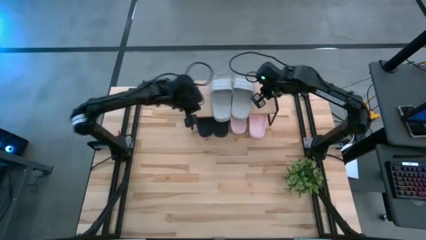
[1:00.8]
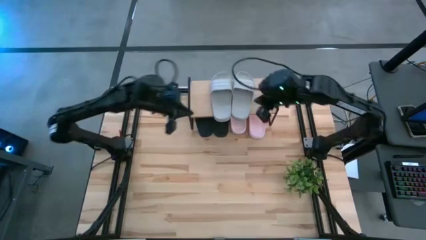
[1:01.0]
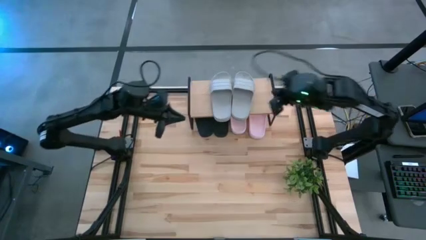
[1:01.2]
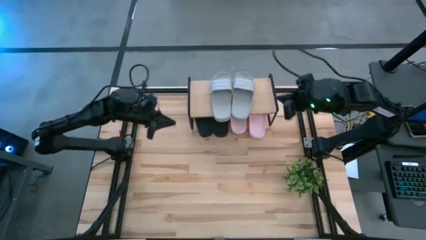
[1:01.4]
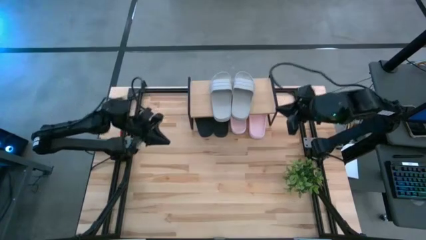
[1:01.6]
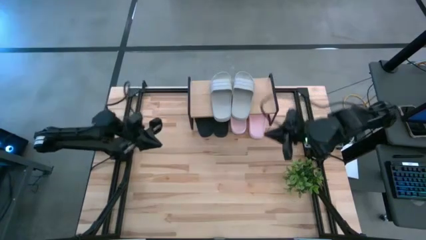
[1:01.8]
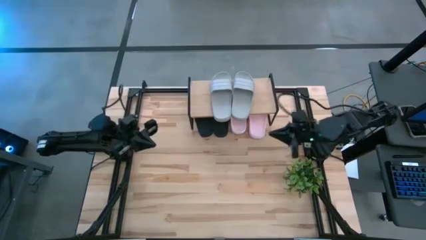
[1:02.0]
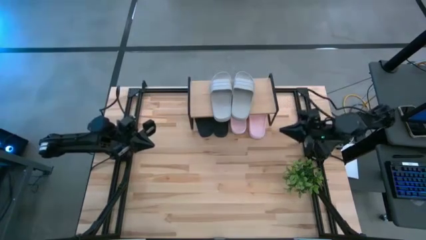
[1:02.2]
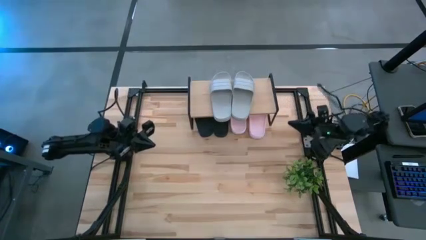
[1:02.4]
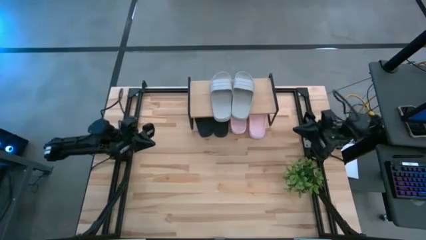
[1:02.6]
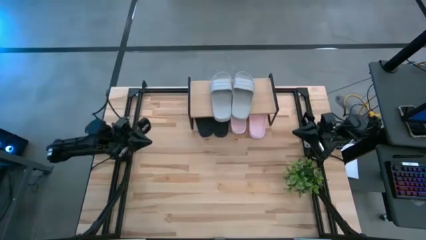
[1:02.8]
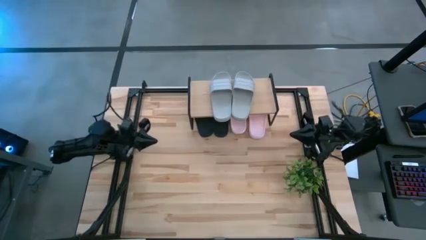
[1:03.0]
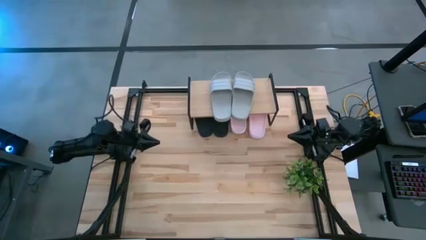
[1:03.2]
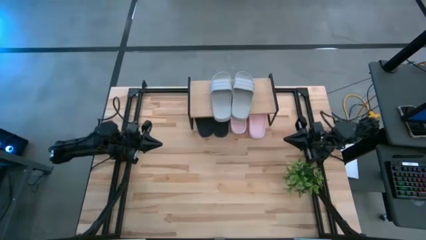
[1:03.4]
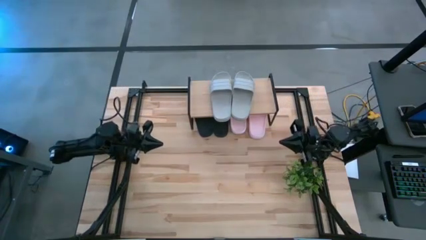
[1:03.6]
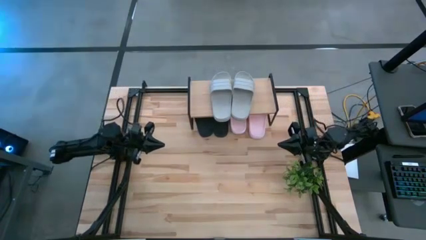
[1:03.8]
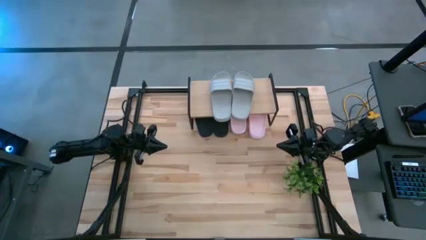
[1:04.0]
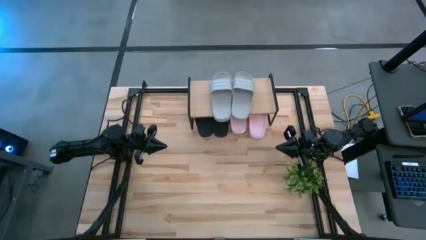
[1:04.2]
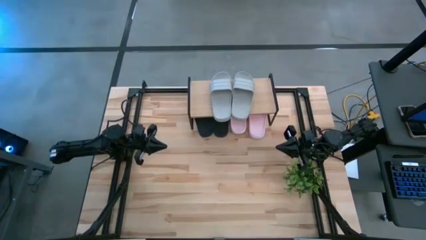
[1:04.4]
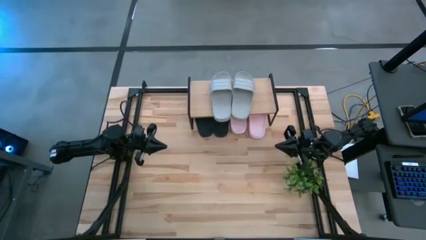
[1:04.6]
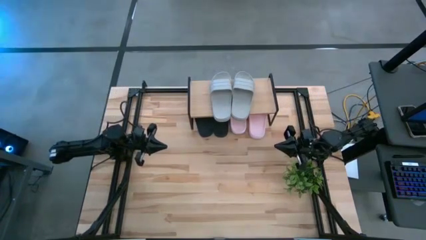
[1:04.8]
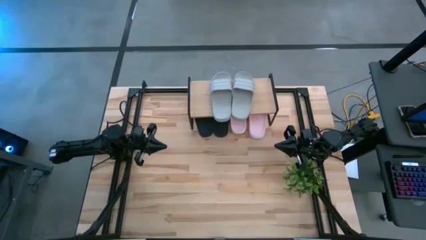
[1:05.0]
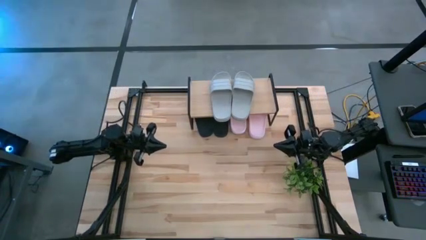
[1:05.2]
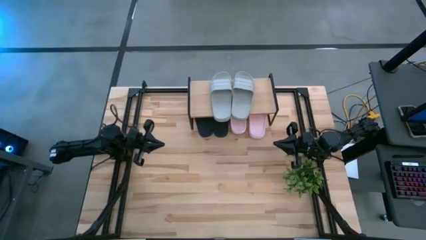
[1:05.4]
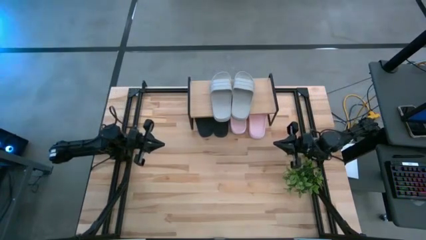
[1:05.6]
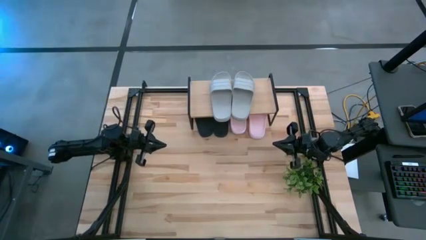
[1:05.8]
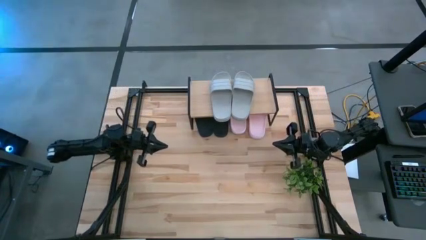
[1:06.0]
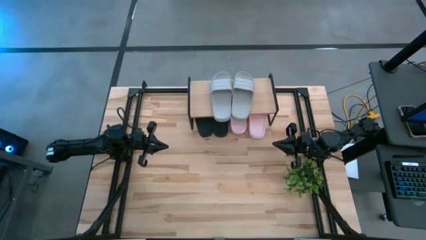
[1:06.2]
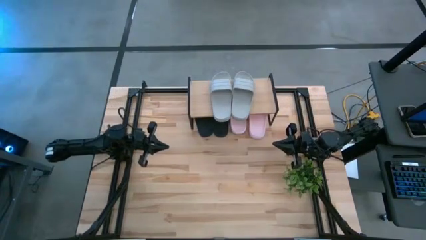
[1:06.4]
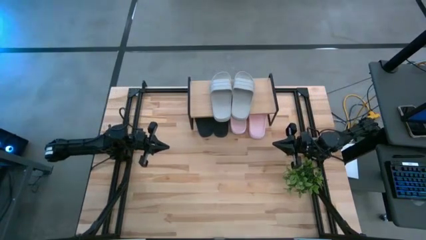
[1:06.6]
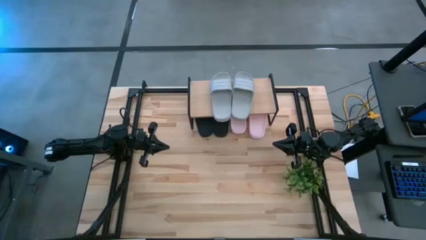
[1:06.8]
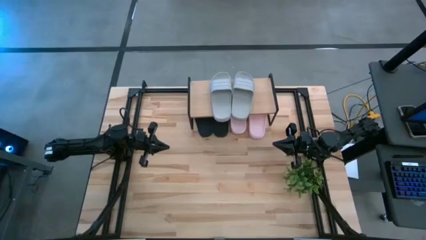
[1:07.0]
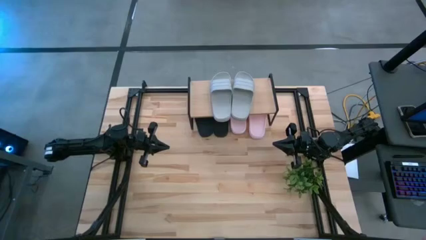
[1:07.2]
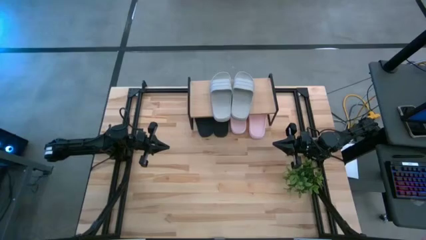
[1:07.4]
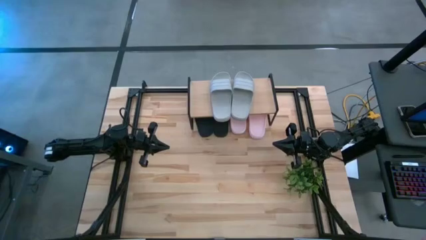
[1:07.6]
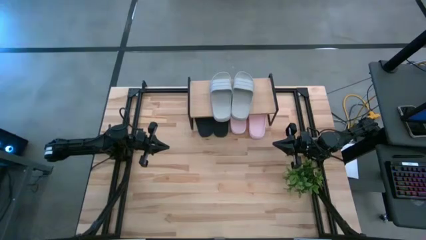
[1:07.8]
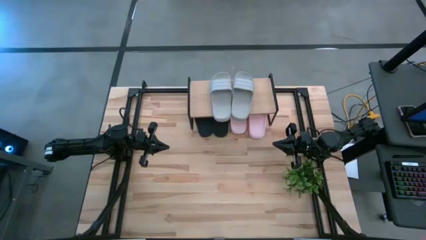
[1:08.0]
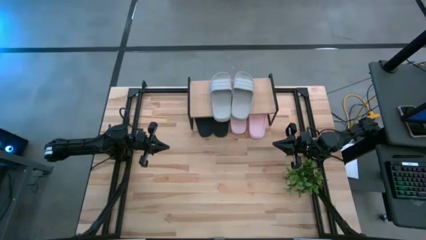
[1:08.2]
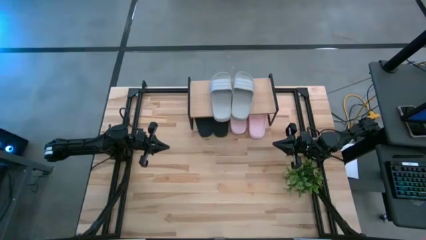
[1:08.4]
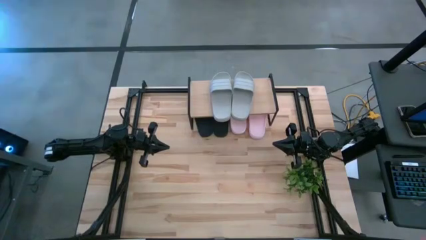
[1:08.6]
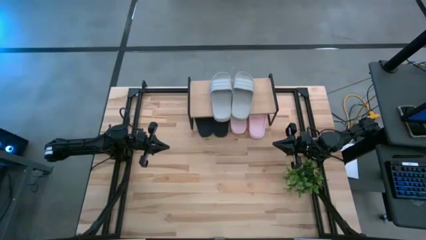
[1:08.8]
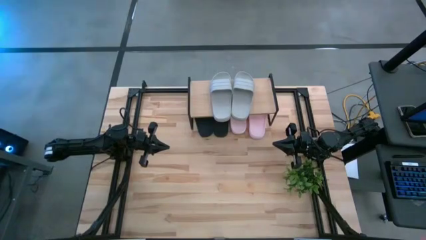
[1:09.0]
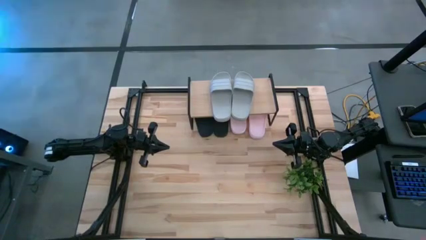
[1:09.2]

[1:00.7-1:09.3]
Task: Pick and place slides into the shelf
Return to Home Position

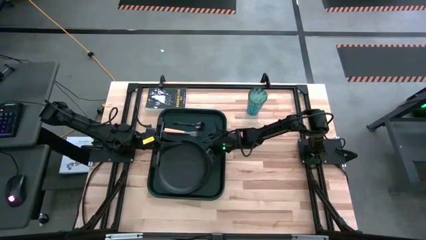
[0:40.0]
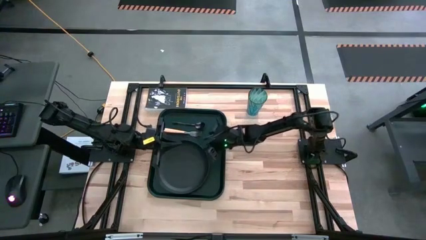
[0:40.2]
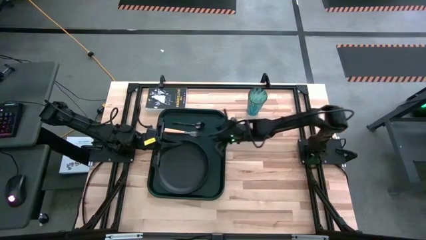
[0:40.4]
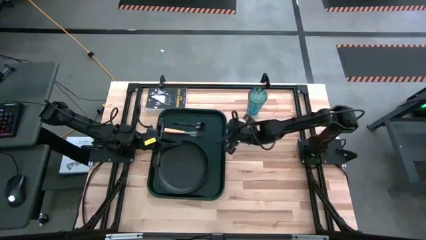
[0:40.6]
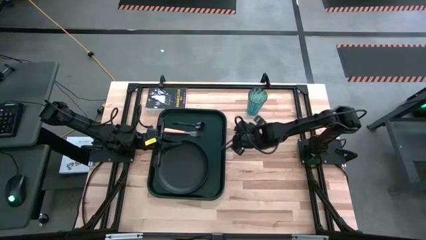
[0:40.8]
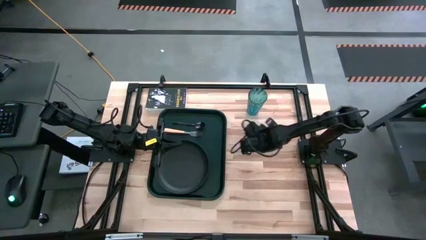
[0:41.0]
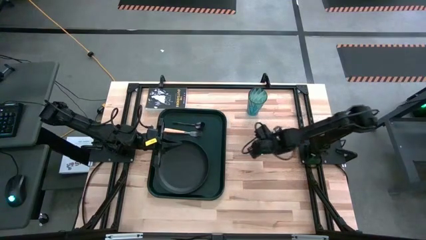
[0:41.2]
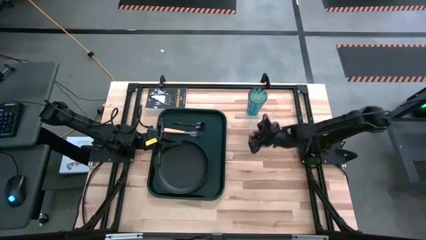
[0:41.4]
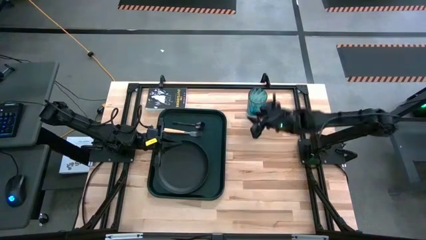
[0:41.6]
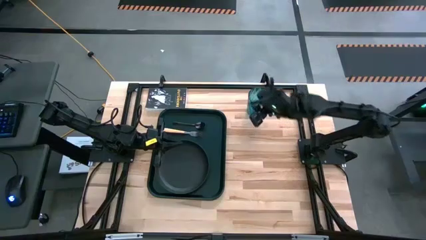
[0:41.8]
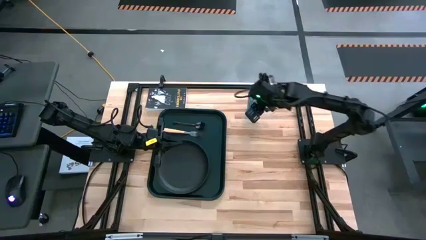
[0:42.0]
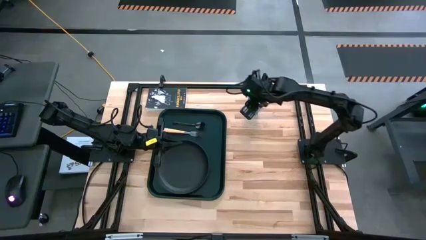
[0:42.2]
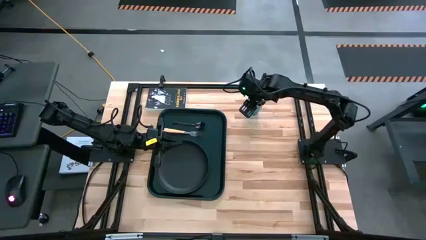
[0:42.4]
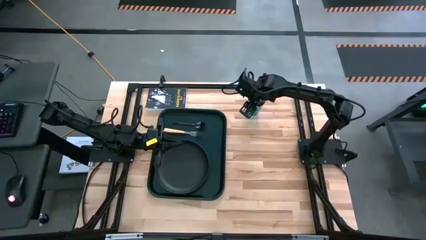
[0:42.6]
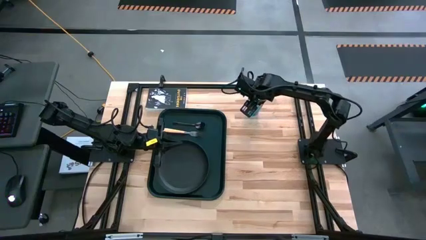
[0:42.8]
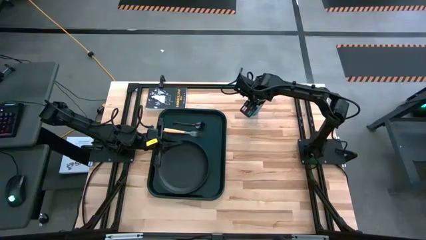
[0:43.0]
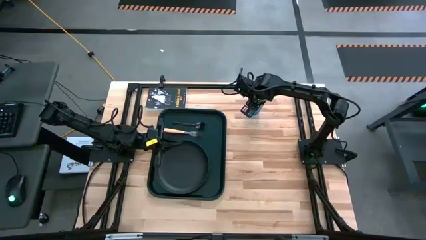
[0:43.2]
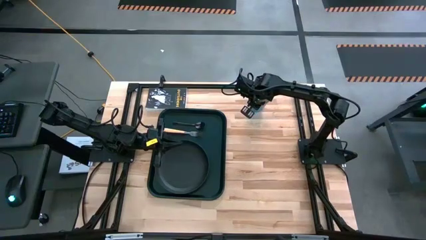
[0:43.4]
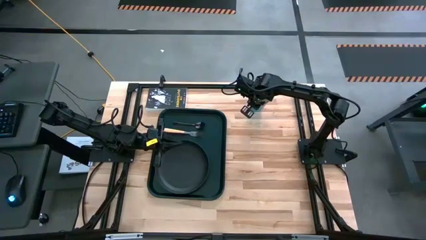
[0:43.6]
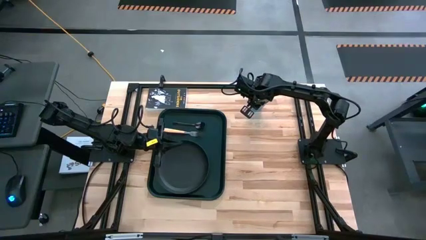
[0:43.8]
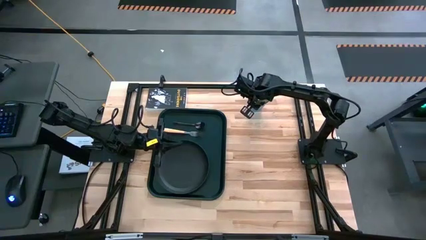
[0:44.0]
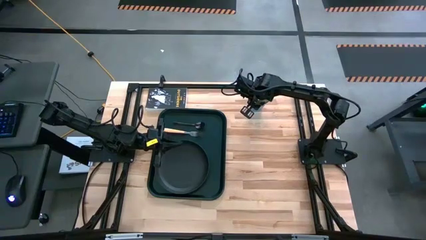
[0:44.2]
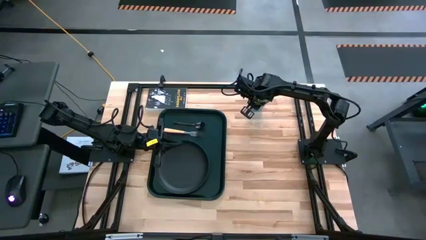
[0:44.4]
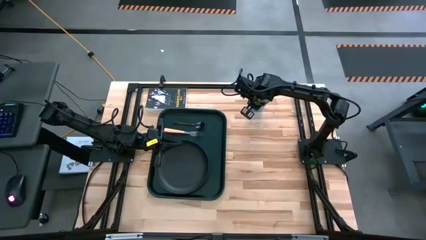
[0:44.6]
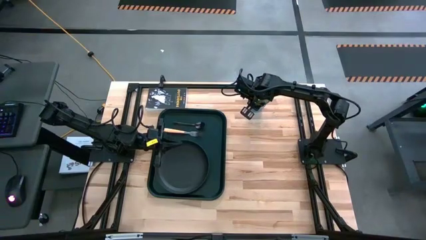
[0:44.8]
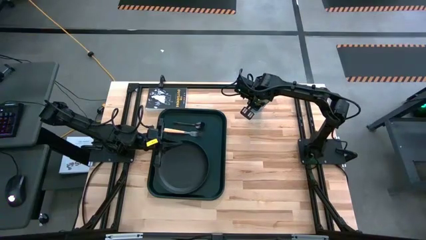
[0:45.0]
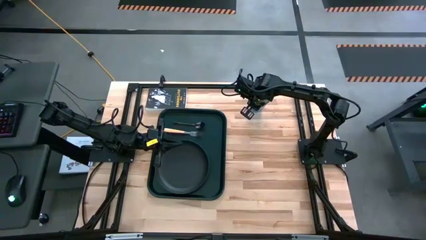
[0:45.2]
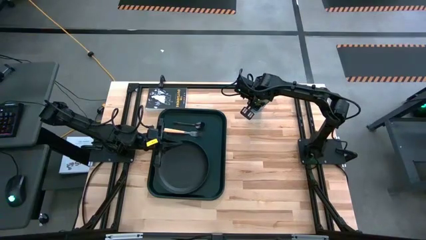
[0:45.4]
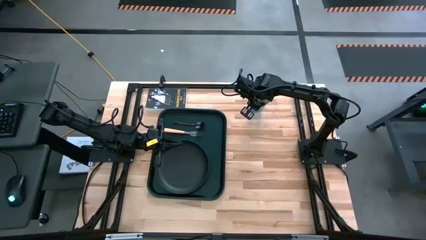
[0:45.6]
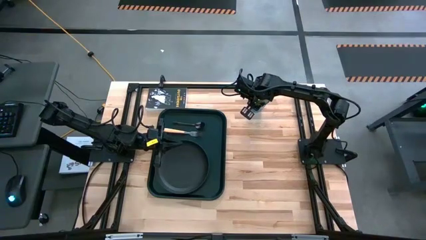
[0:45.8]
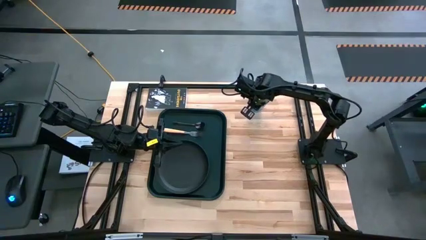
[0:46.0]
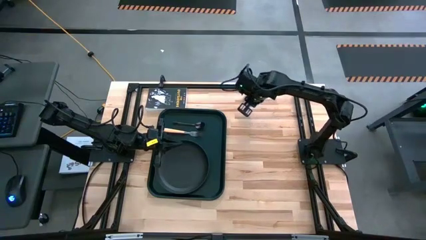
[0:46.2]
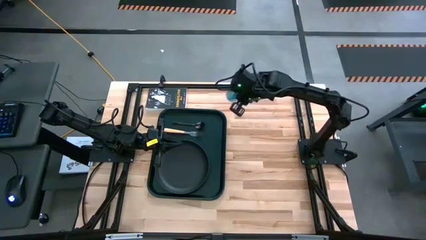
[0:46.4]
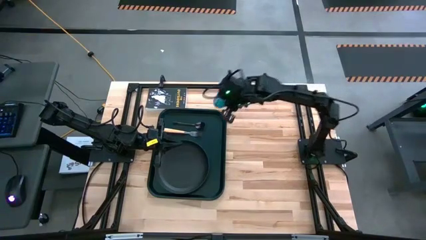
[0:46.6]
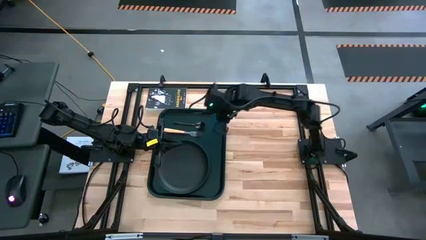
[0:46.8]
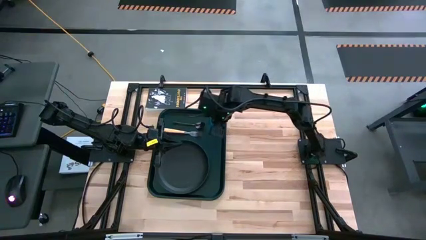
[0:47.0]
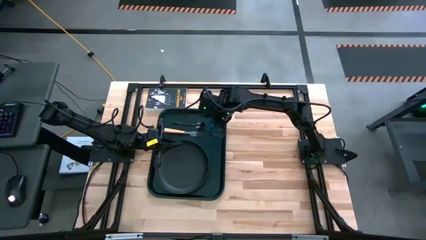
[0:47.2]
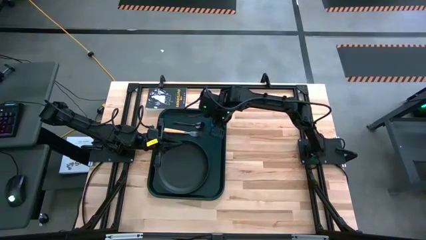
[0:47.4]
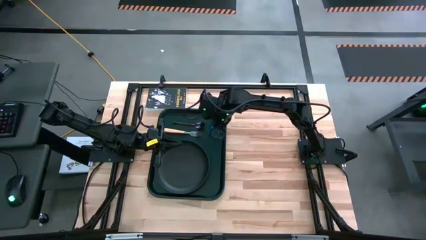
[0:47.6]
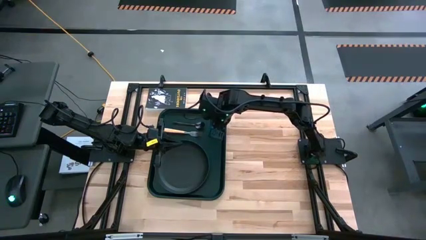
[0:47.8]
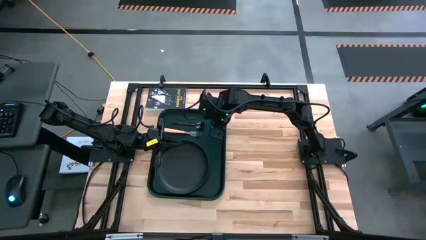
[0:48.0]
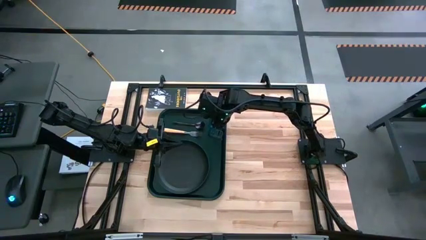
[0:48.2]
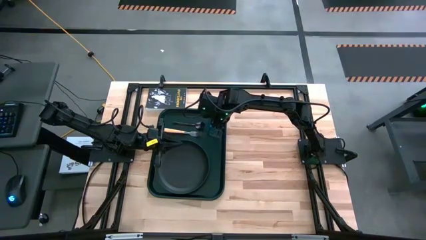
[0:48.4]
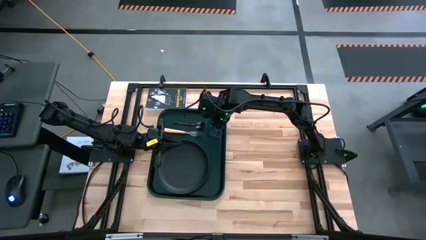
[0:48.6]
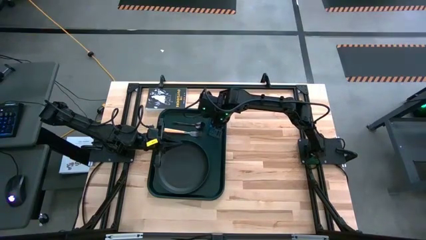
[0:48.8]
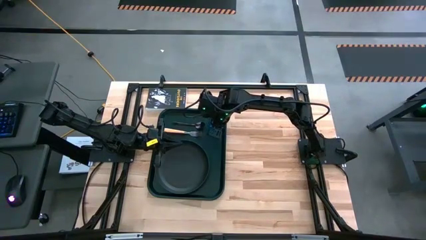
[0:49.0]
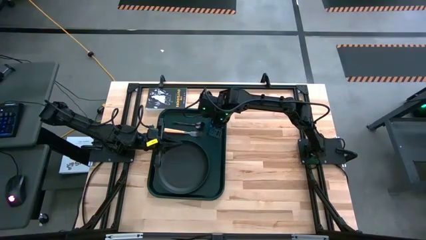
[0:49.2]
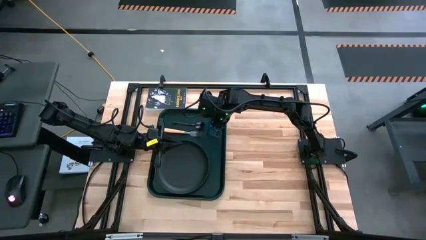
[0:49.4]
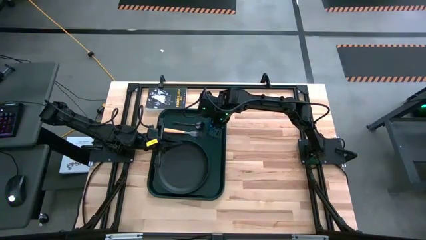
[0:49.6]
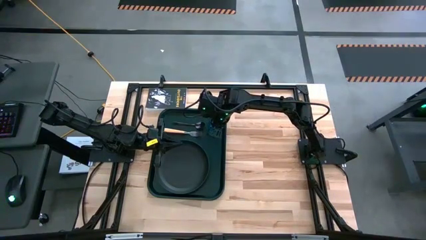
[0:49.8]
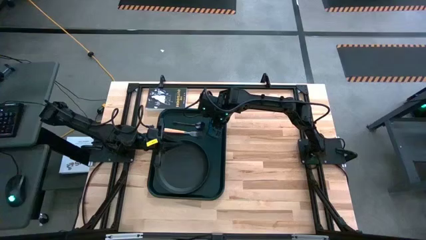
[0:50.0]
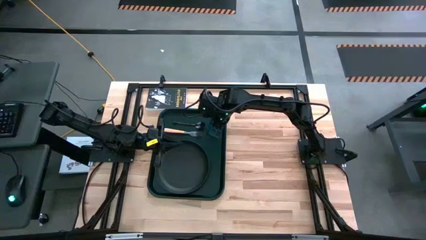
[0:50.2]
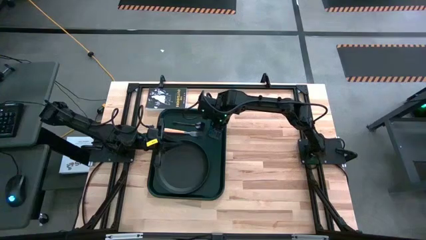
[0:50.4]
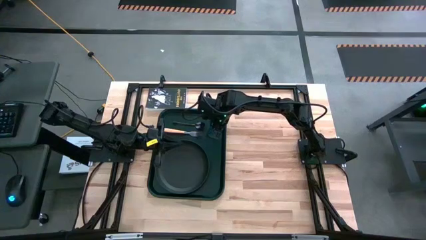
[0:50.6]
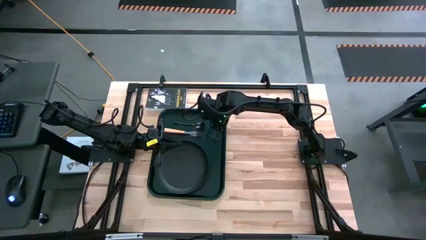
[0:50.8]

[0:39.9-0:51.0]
Task: Pick and place plate/cup/fork/spoon on tray
Put the cup on the top left of the tray
